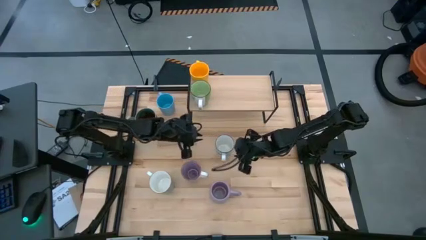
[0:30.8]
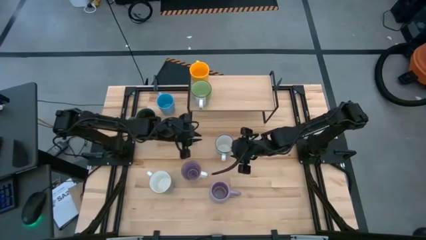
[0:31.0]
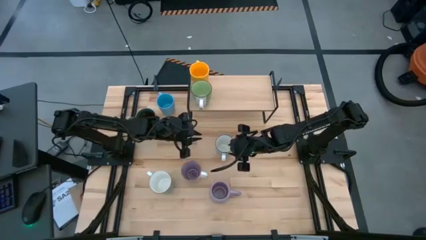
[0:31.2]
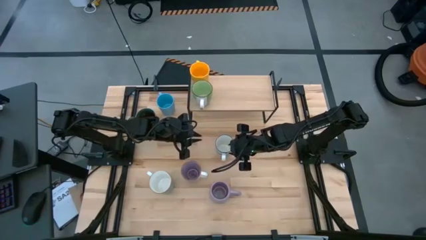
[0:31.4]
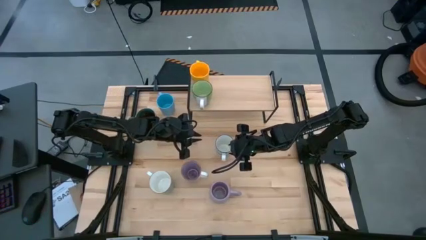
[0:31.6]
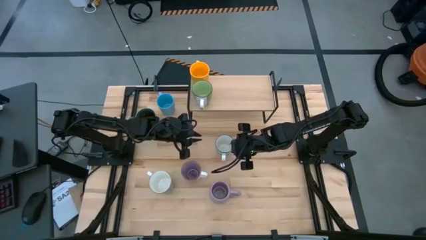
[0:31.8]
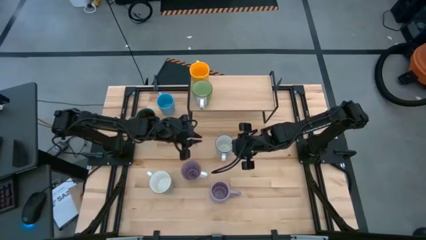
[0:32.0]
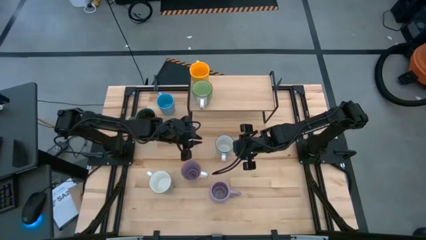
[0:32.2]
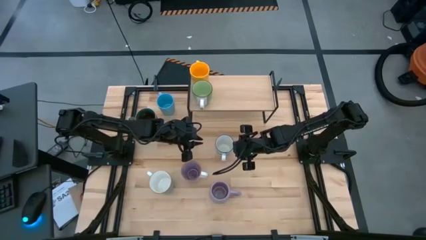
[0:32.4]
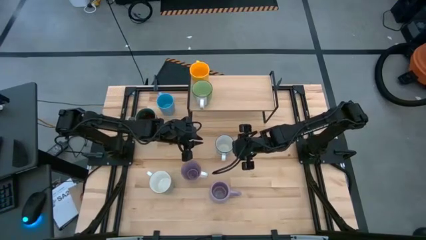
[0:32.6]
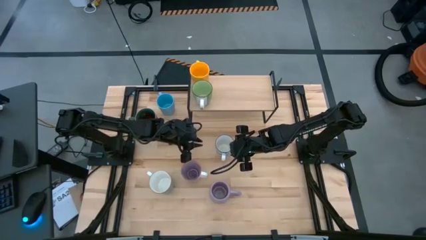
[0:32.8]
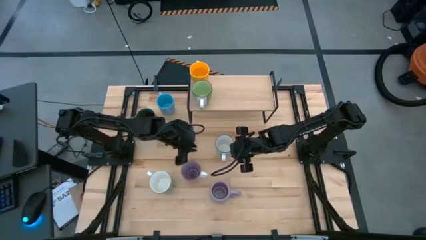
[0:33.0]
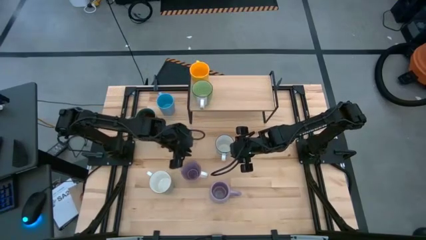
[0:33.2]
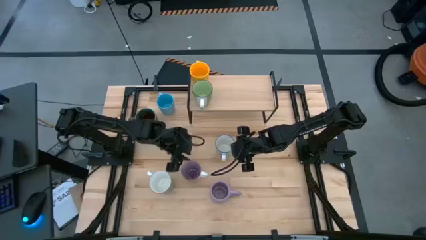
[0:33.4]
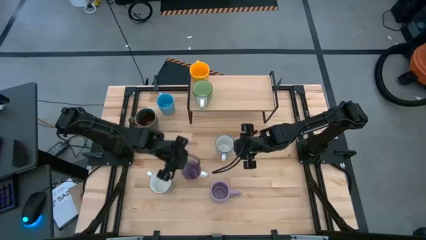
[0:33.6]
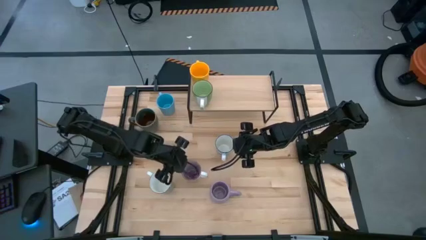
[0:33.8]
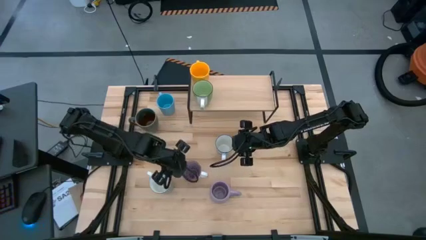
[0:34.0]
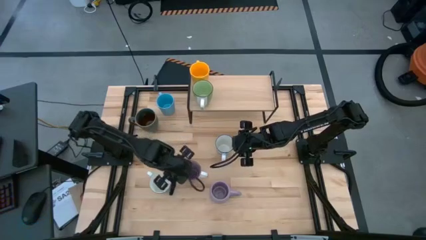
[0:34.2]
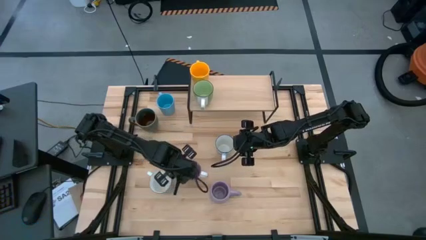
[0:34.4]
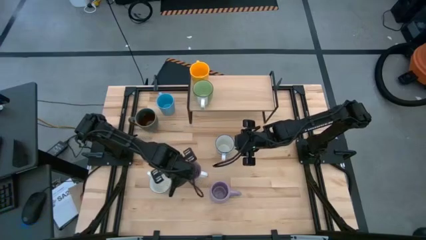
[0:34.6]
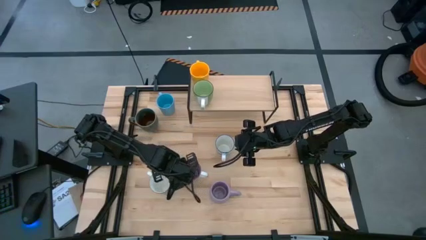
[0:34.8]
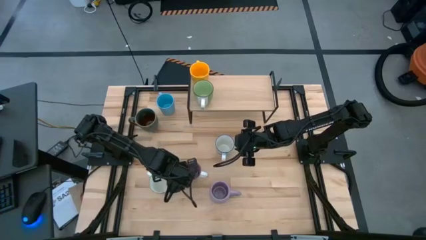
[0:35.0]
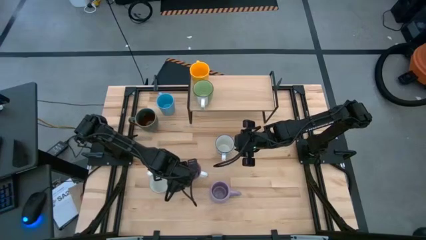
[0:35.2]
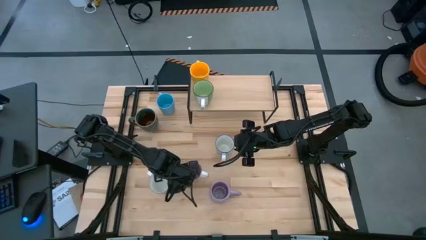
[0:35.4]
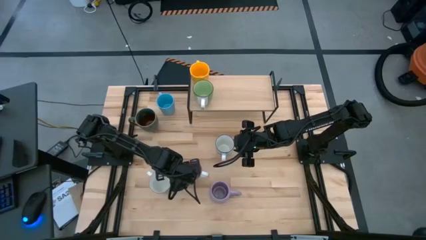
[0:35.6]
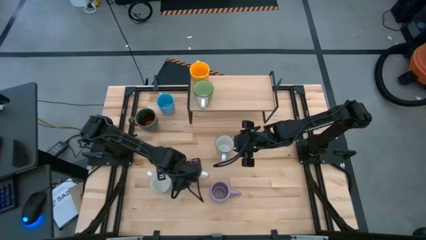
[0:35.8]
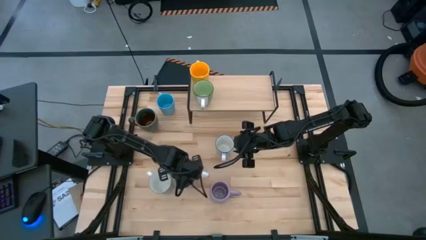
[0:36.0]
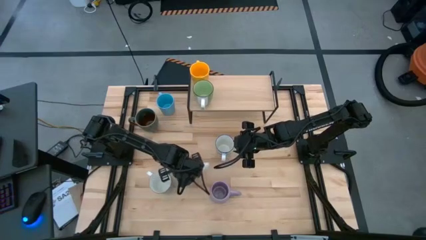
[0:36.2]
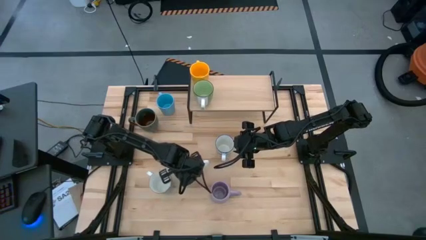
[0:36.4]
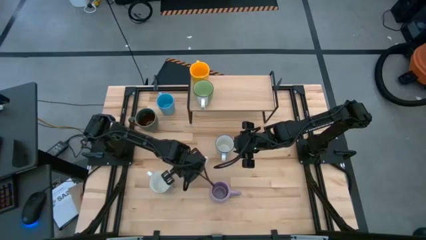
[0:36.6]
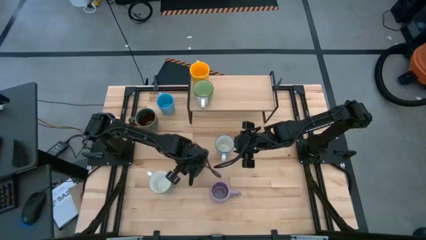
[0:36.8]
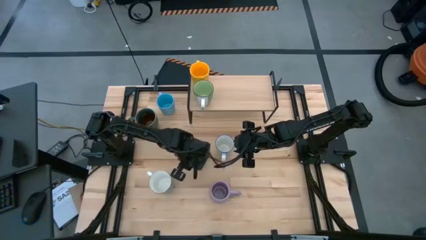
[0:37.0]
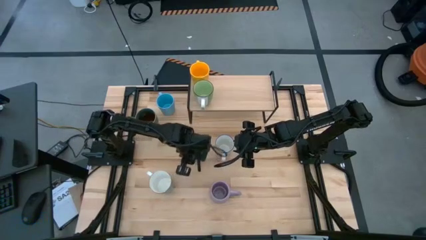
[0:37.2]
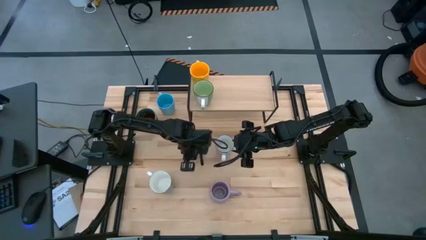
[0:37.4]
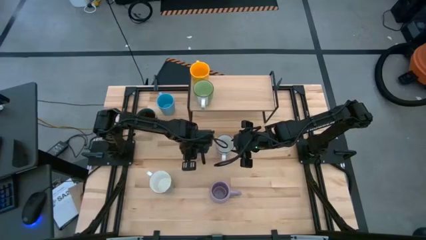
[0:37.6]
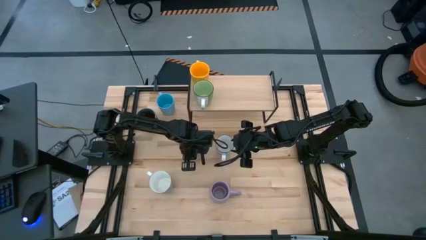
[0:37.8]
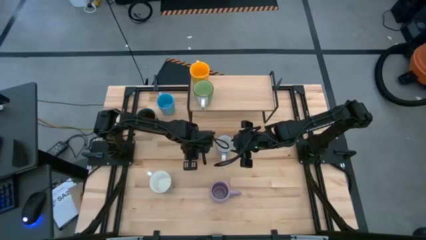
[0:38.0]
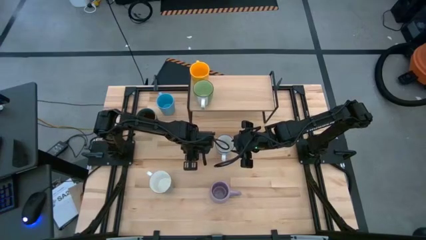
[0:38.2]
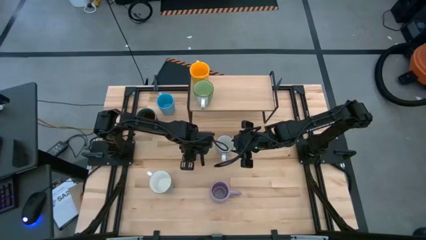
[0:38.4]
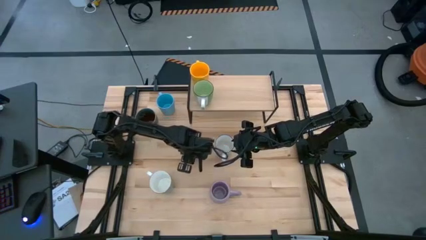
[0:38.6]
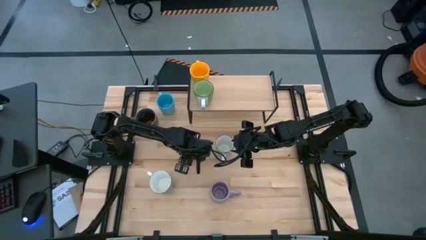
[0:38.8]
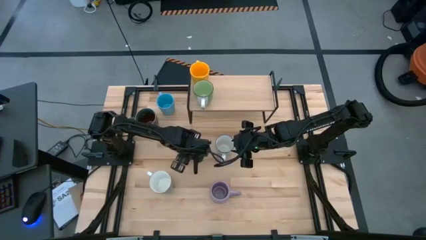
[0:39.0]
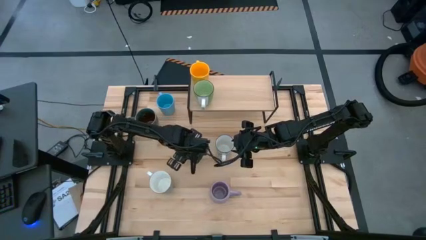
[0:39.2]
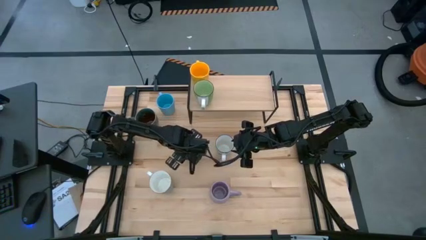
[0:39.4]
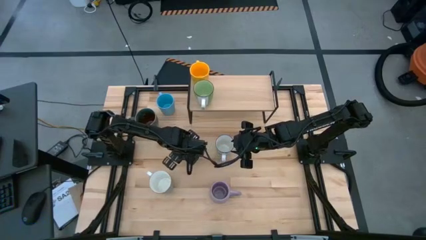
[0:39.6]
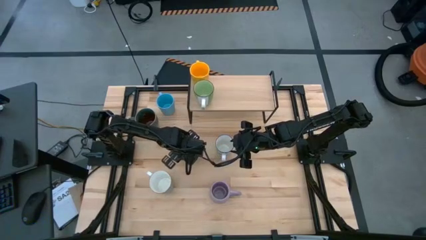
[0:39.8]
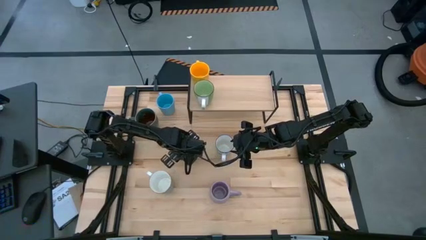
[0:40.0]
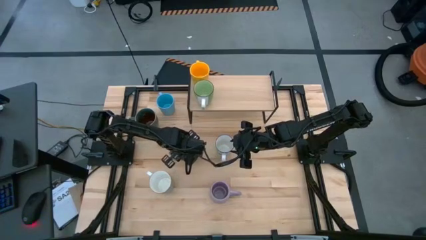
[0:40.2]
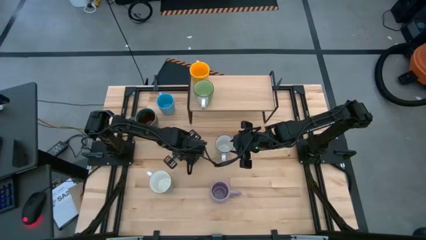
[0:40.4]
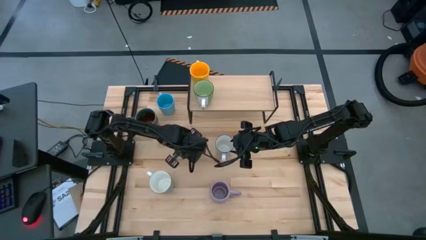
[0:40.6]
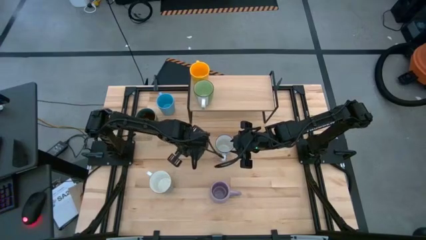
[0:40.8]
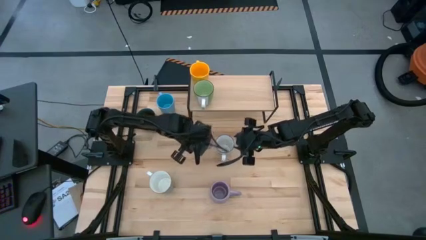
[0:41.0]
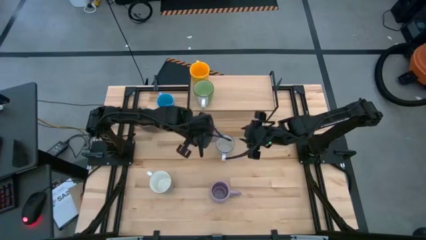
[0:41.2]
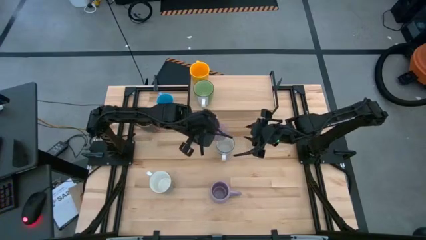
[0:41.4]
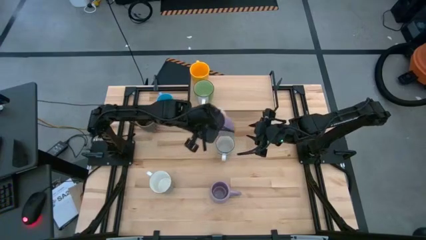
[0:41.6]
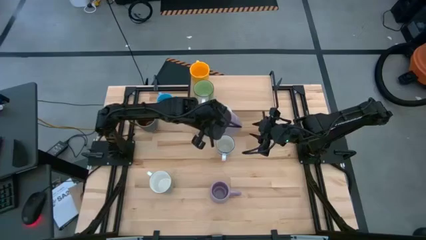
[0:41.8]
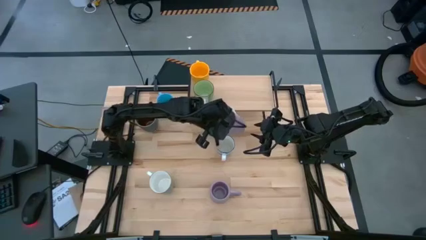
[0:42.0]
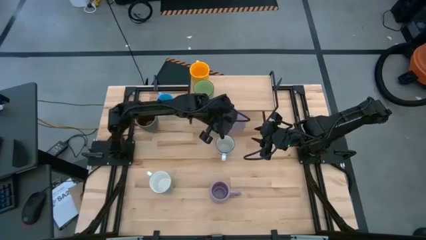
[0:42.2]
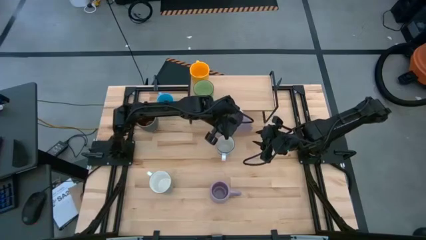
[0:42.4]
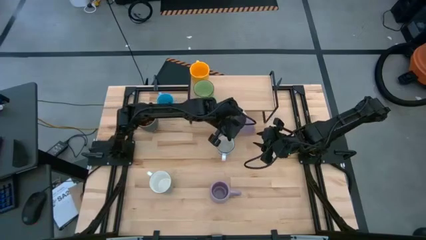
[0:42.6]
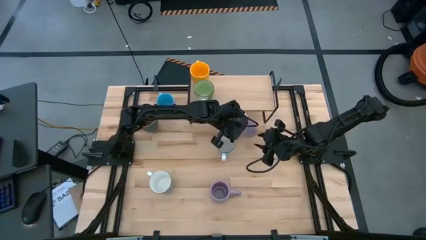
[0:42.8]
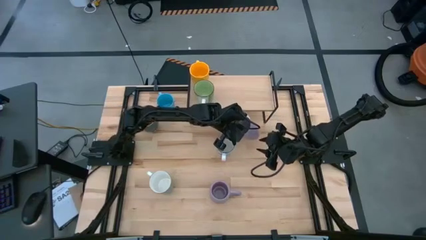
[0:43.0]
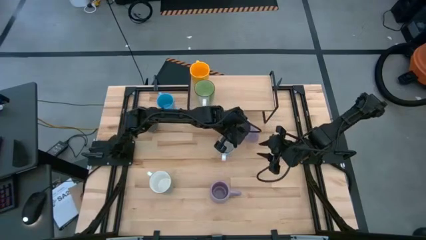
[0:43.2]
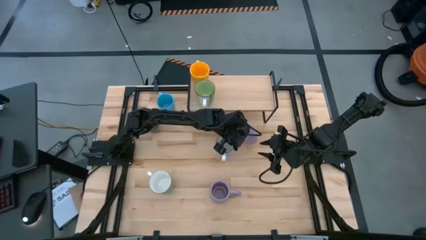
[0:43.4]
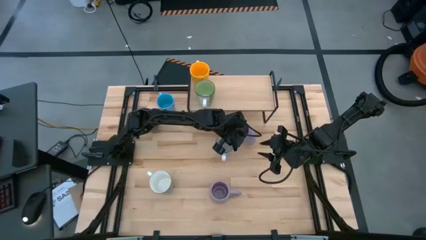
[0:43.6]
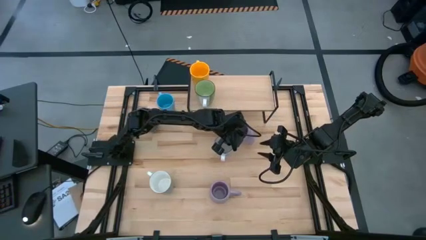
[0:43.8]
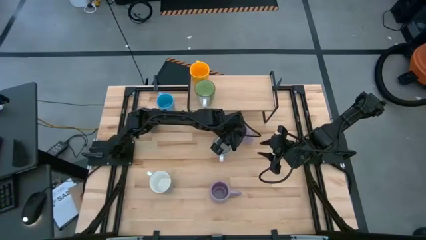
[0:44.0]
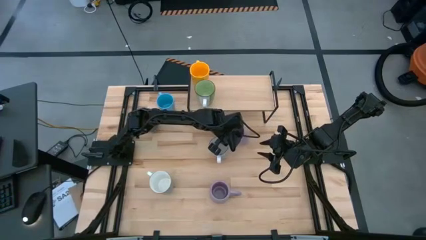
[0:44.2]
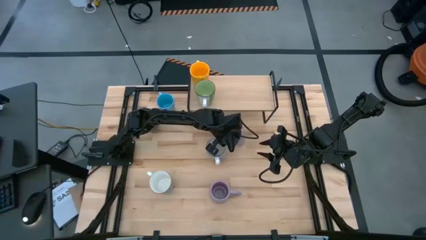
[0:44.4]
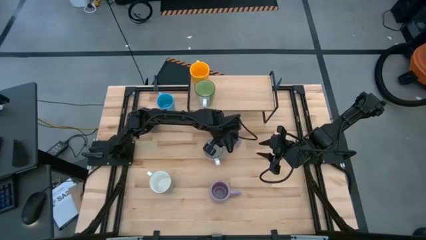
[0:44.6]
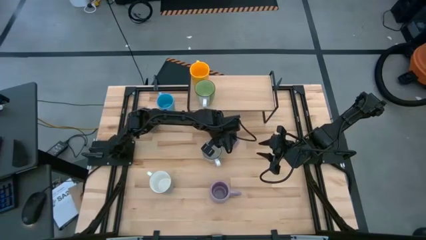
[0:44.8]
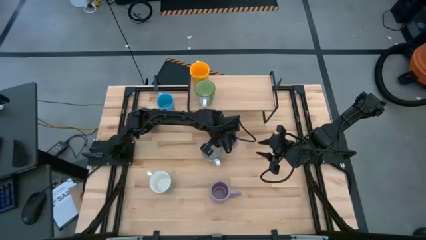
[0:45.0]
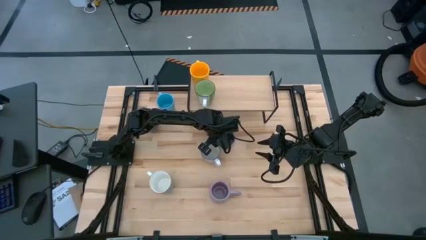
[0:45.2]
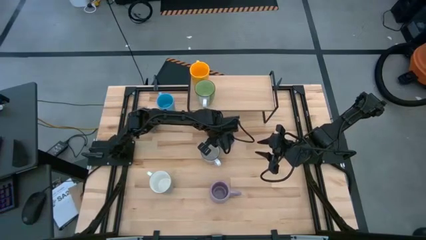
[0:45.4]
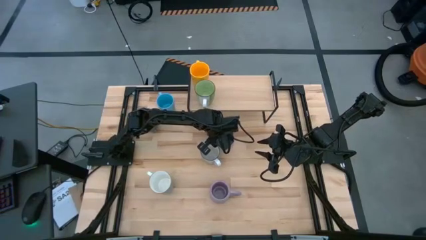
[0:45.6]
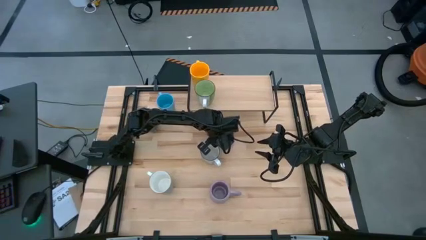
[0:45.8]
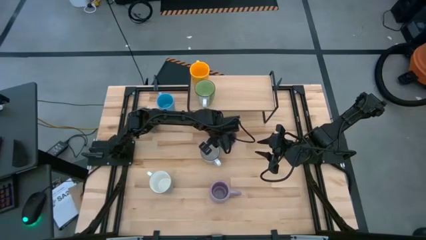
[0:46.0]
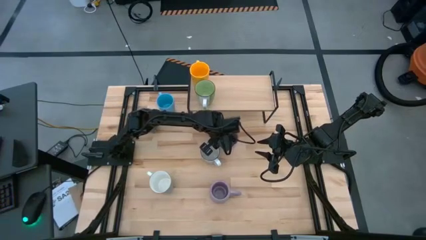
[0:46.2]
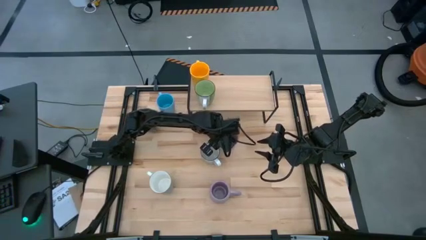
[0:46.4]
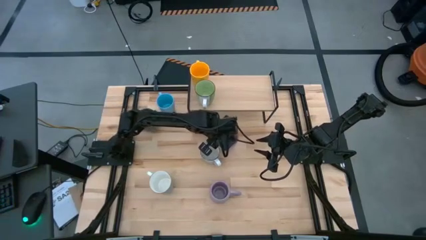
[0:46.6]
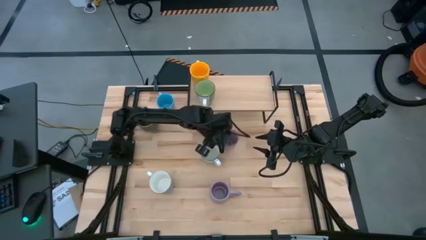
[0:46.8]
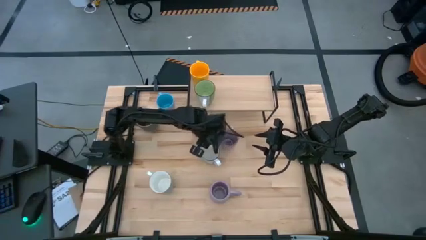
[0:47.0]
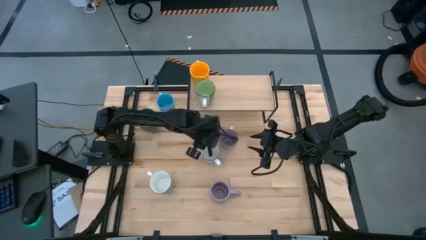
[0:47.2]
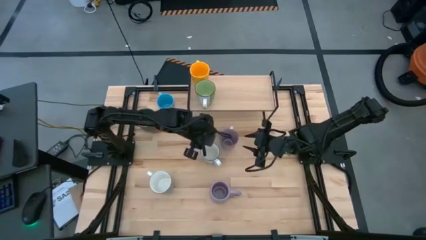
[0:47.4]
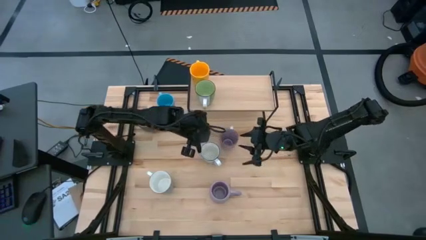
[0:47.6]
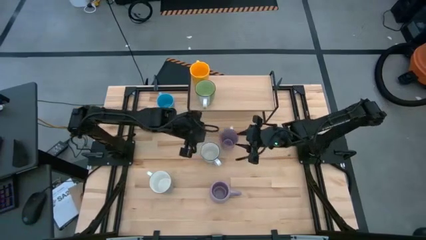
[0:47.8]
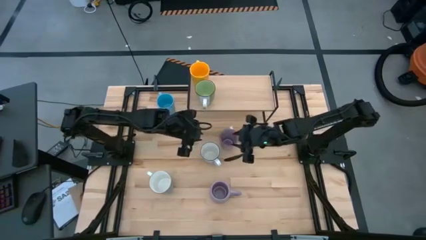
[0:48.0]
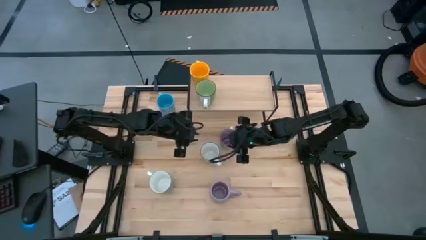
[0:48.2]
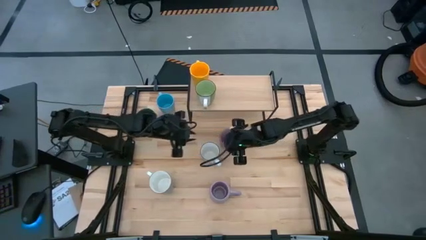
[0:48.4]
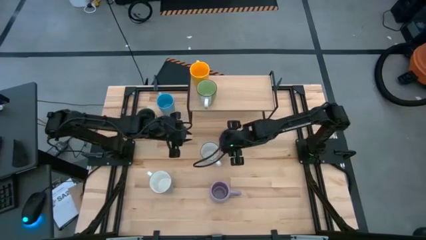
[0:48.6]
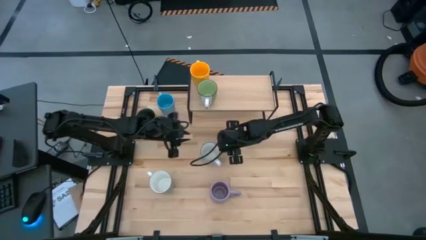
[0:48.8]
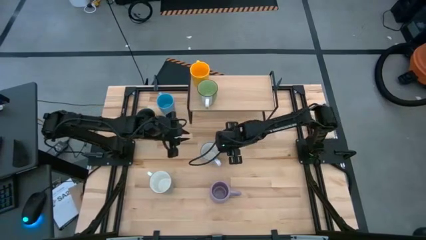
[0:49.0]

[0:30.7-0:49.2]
Task: Place coffee mugs
Put the top purple mug on the shelf
